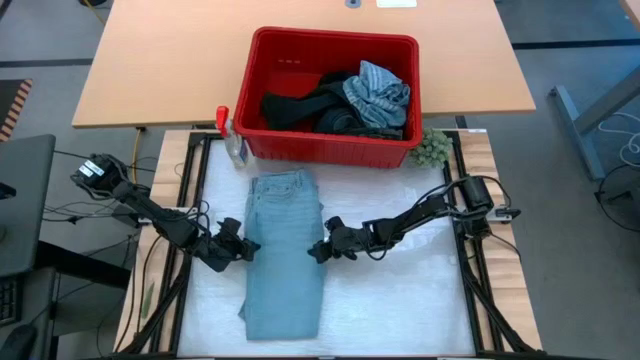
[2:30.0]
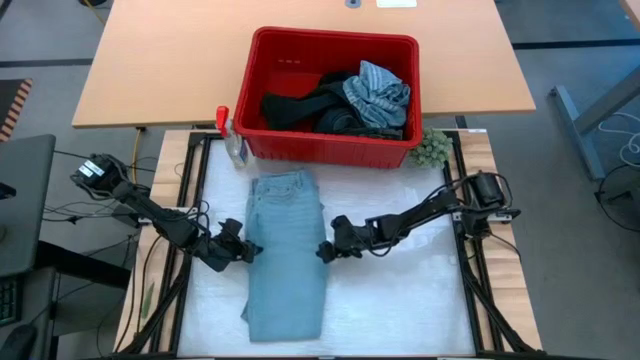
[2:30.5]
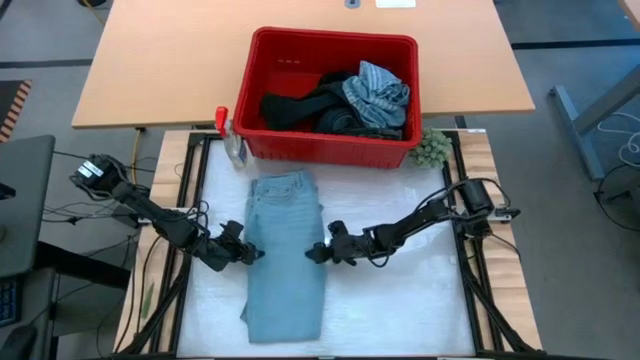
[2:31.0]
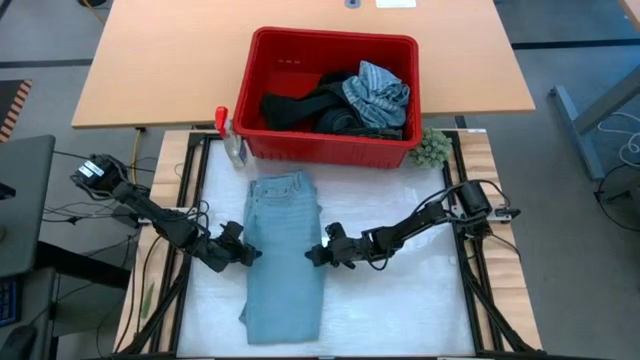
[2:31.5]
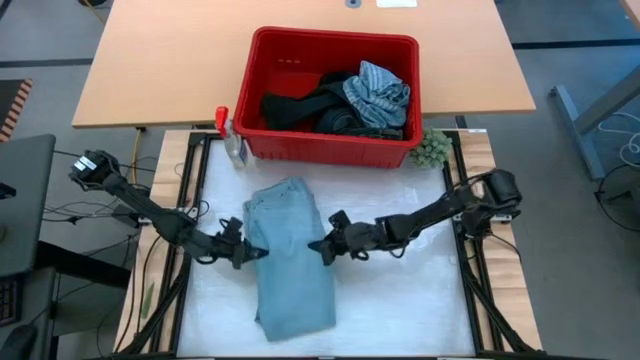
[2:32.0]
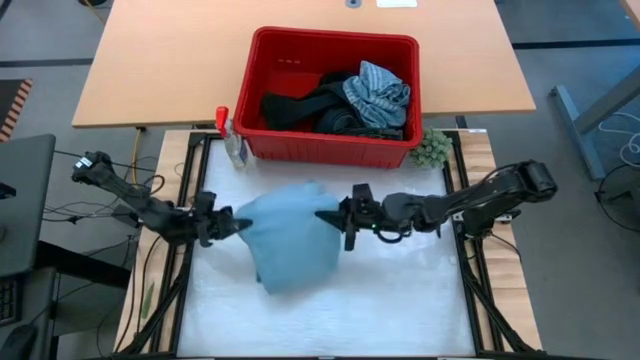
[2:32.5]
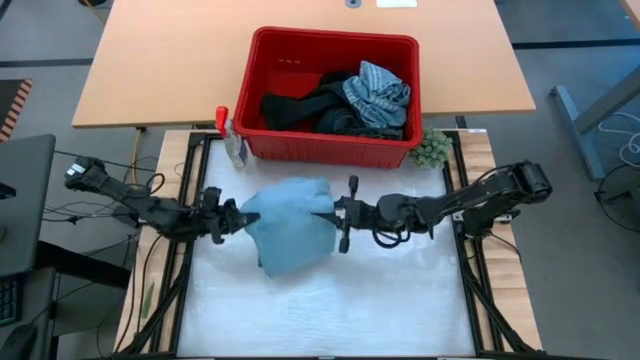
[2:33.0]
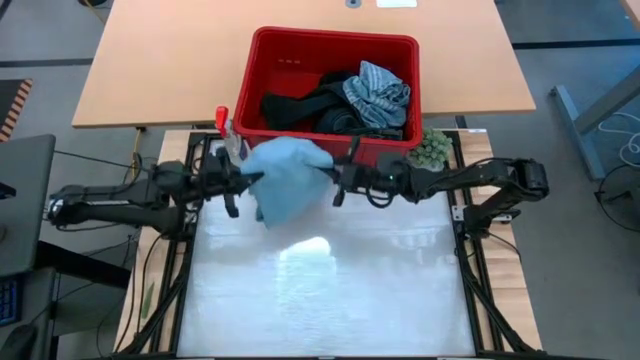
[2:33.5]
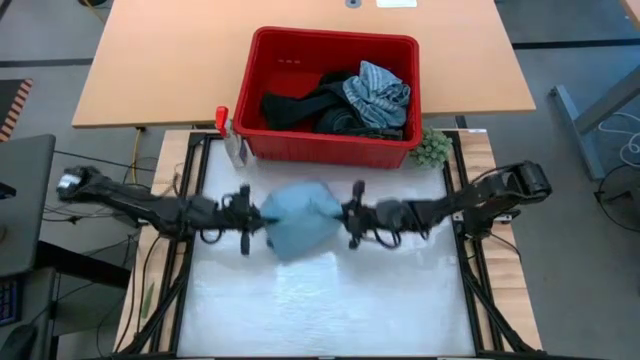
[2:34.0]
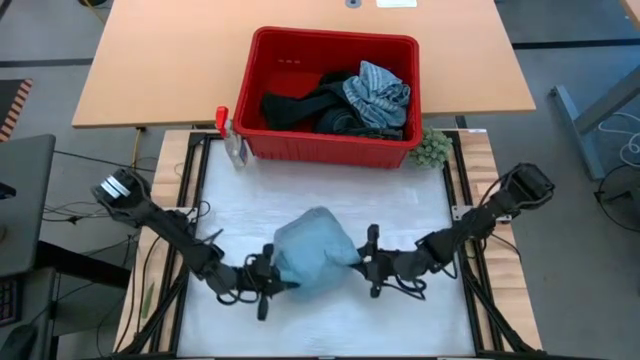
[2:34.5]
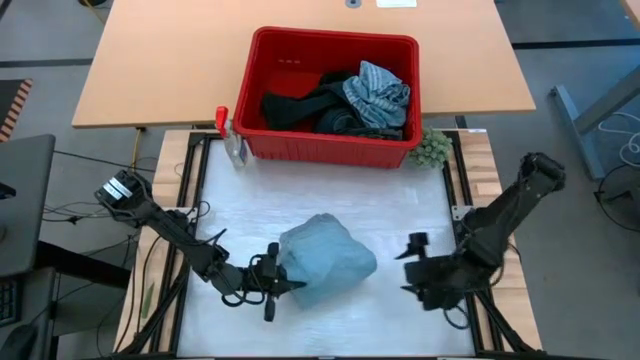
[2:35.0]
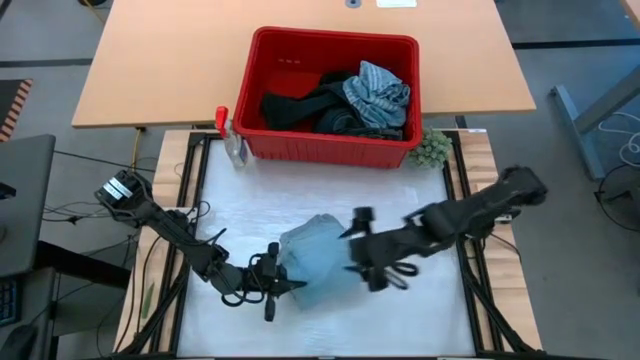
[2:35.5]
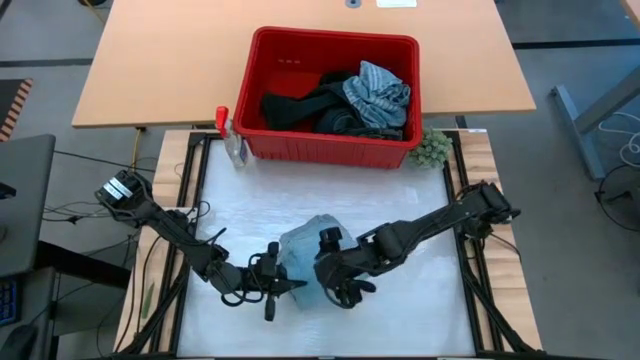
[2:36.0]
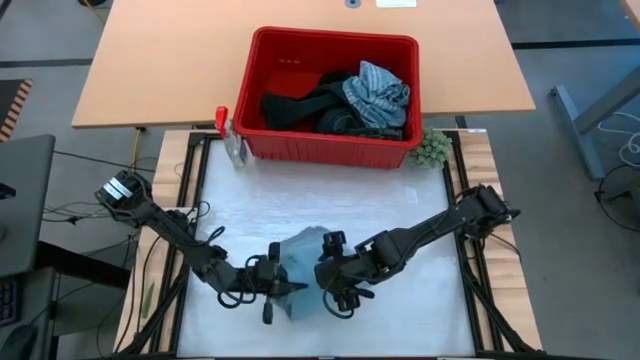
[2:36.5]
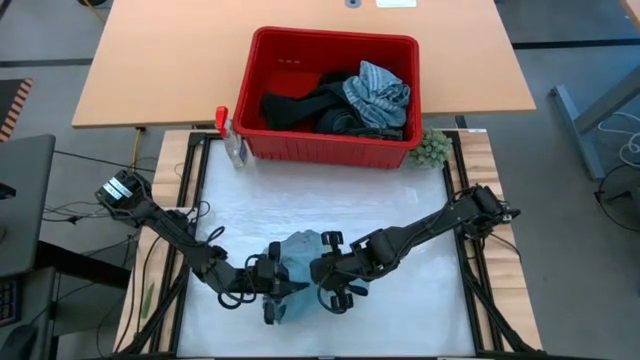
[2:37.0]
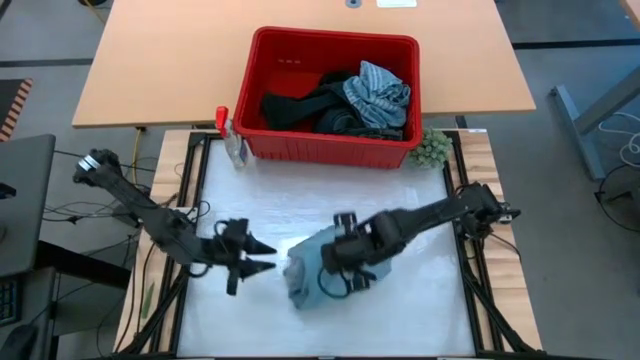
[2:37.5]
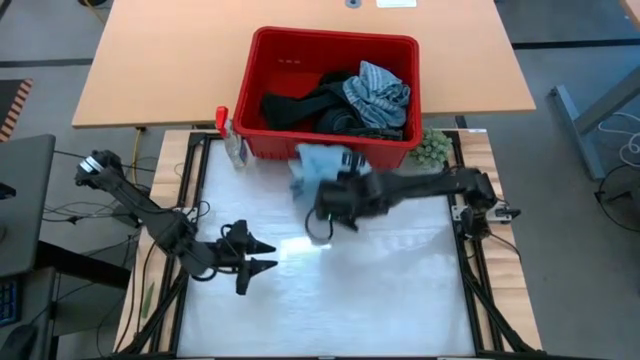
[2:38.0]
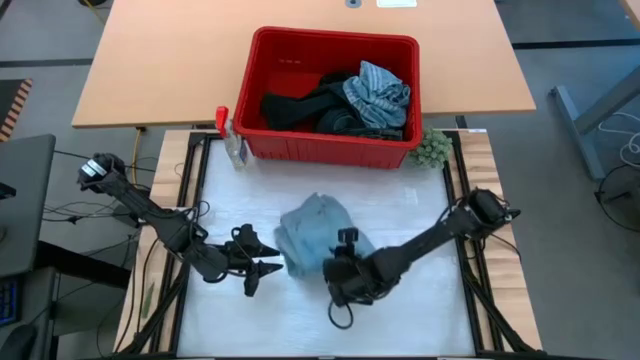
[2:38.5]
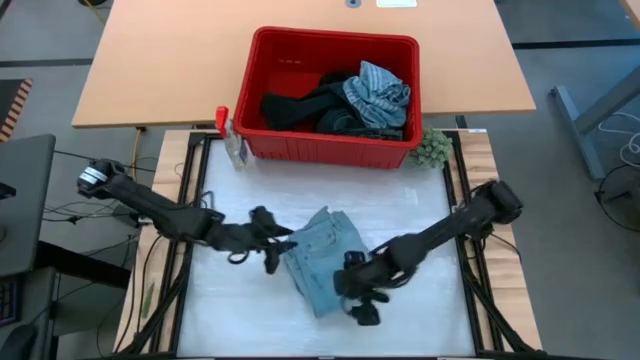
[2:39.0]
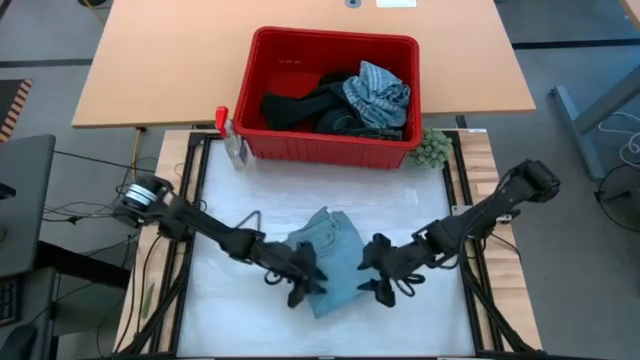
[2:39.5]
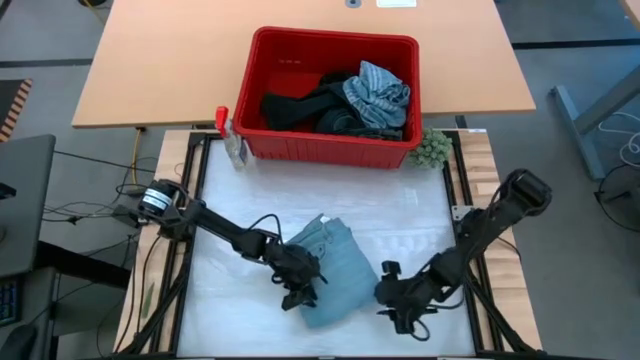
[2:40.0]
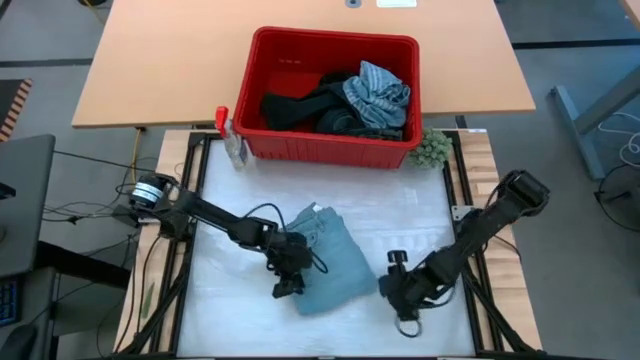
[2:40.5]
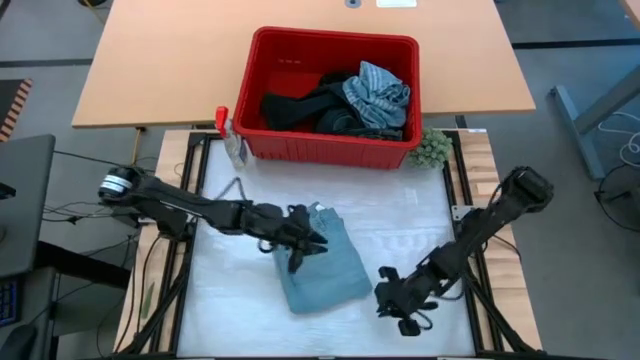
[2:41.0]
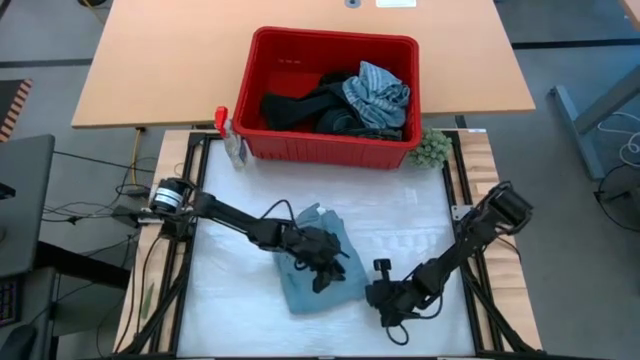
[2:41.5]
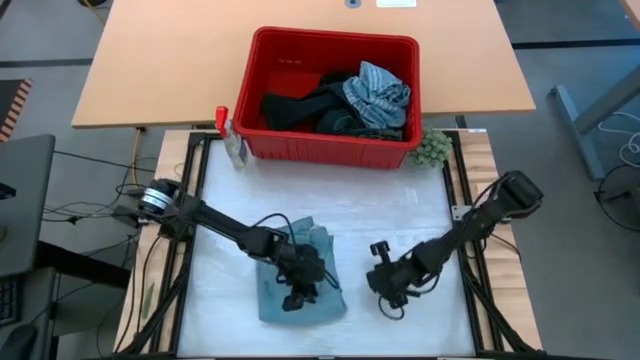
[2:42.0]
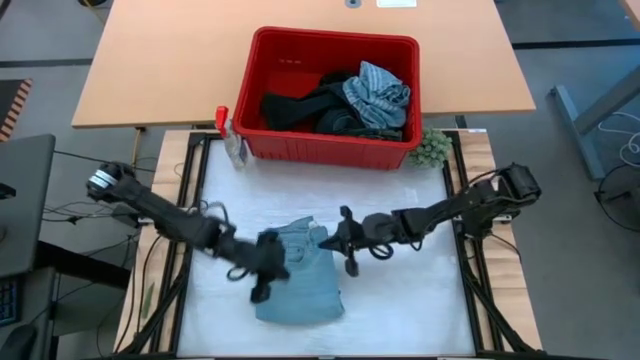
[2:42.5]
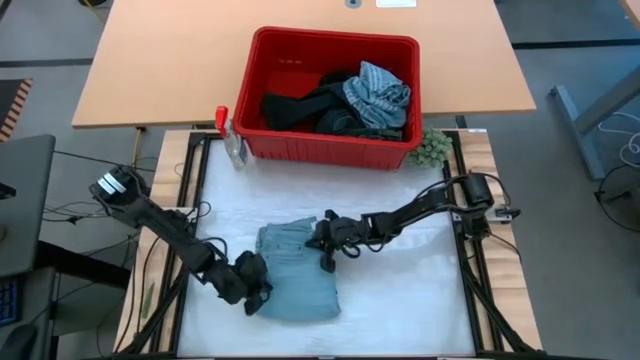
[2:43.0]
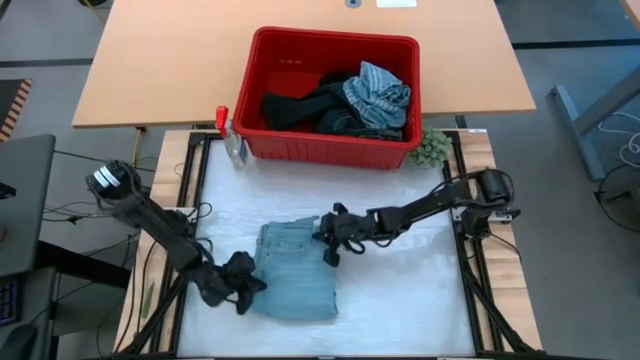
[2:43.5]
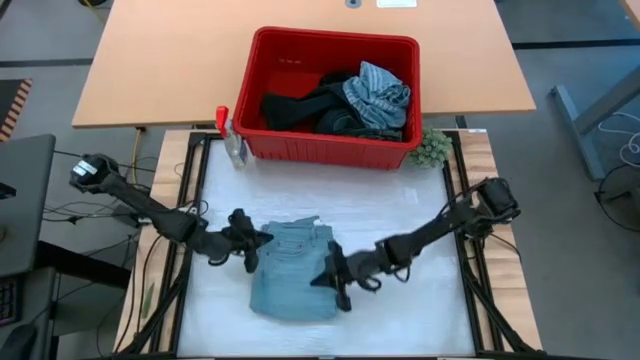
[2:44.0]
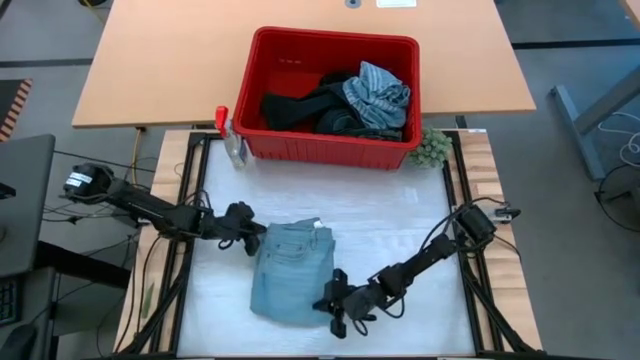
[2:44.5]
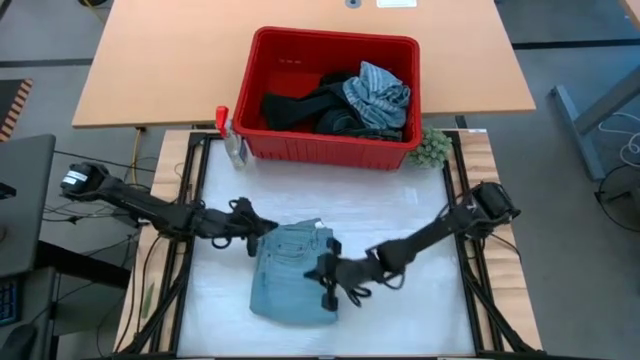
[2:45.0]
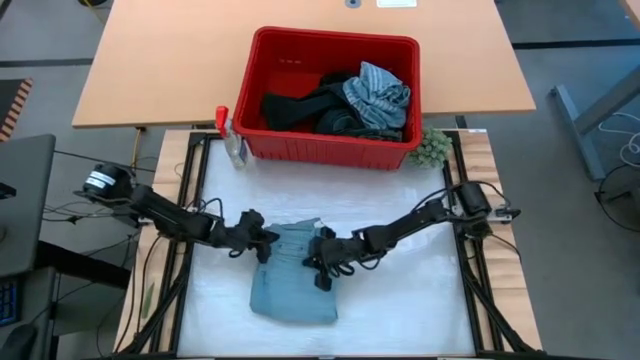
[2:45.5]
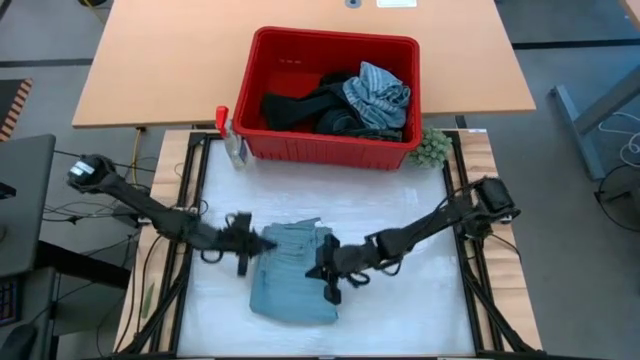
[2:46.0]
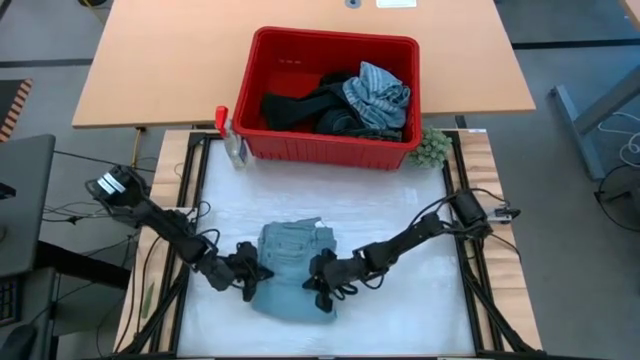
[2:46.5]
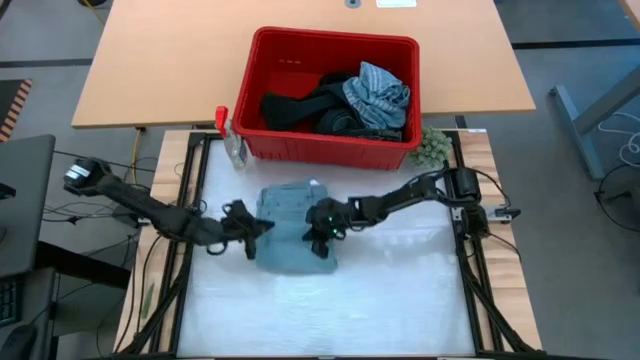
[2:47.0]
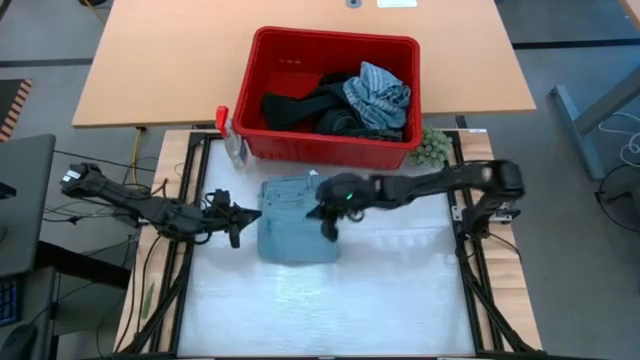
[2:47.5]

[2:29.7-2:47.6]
Task: Fold laundry
Fold the blue pants from the red laundry bin

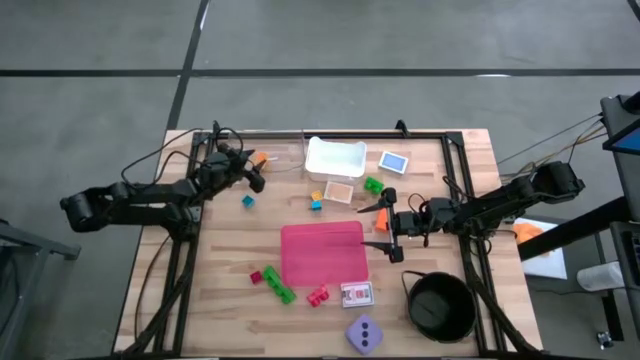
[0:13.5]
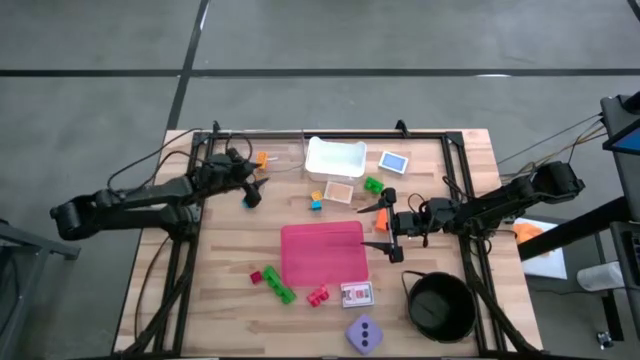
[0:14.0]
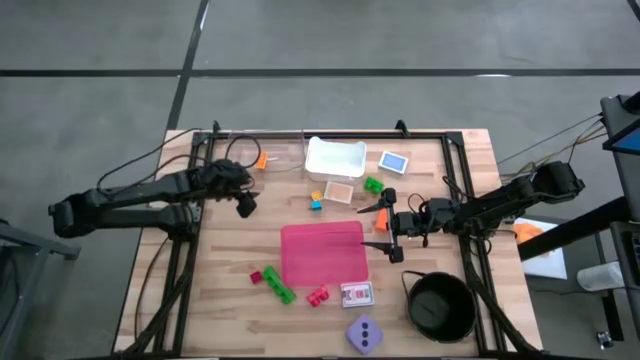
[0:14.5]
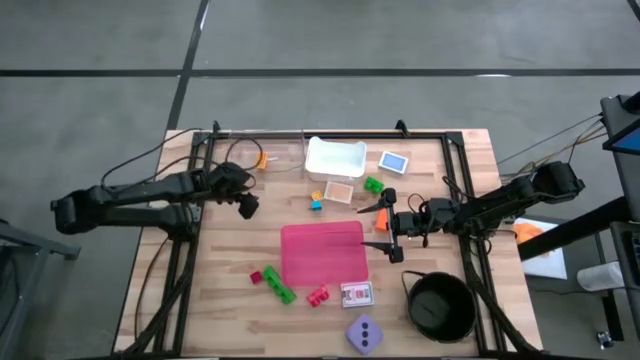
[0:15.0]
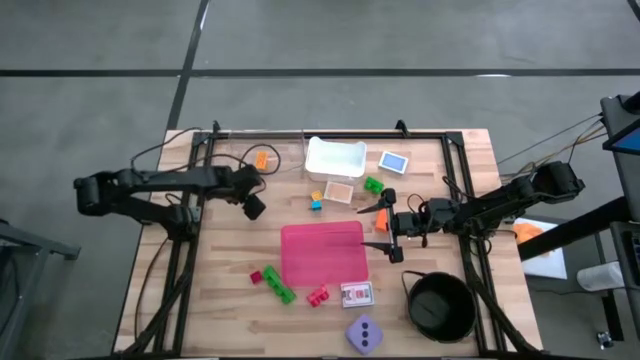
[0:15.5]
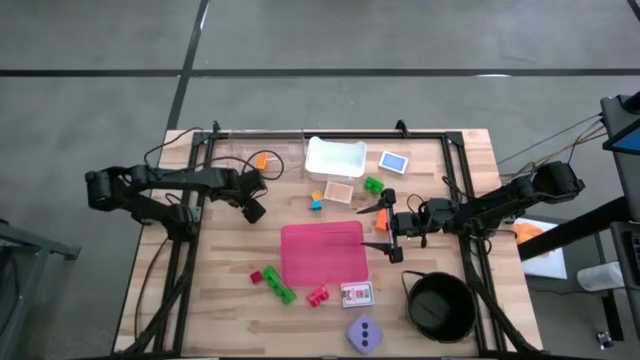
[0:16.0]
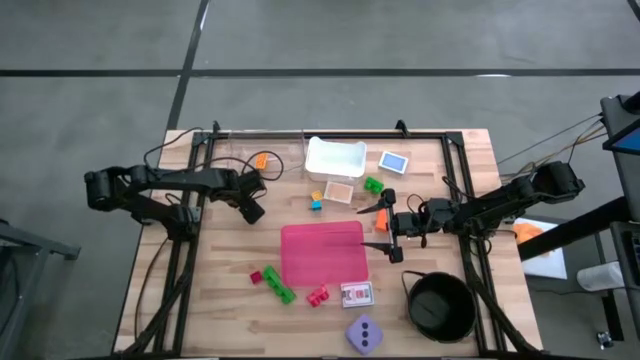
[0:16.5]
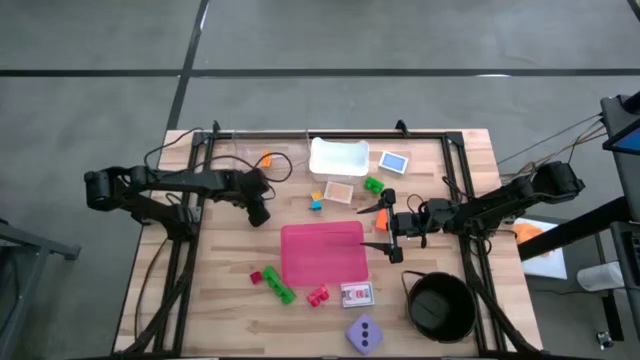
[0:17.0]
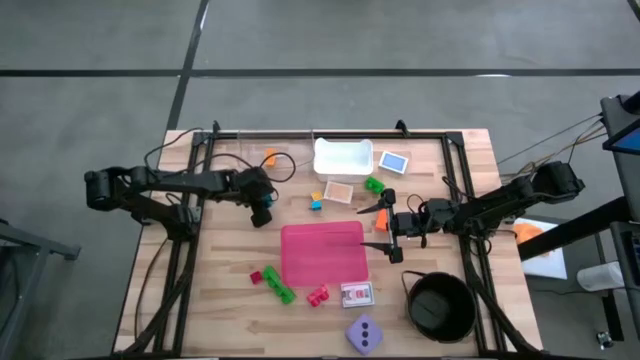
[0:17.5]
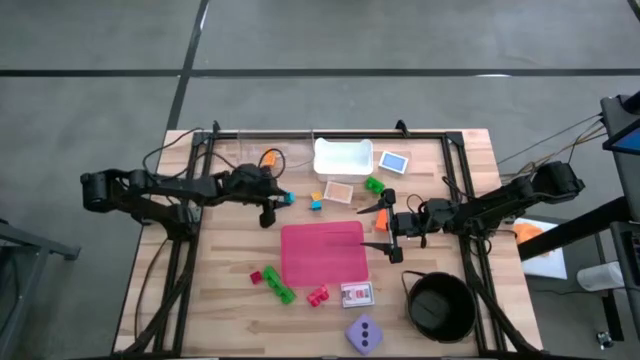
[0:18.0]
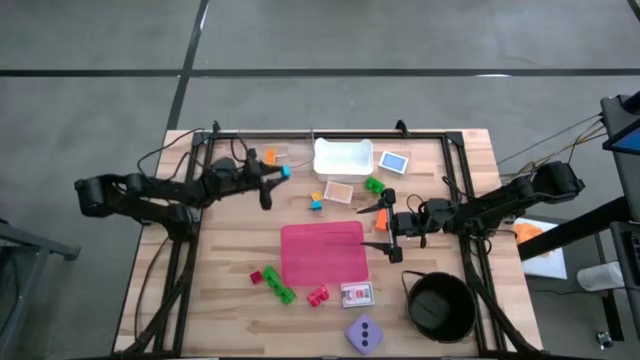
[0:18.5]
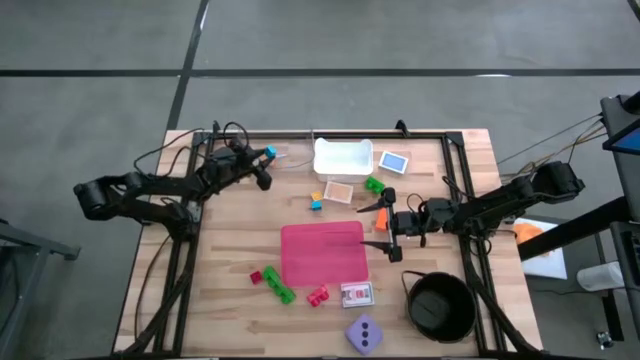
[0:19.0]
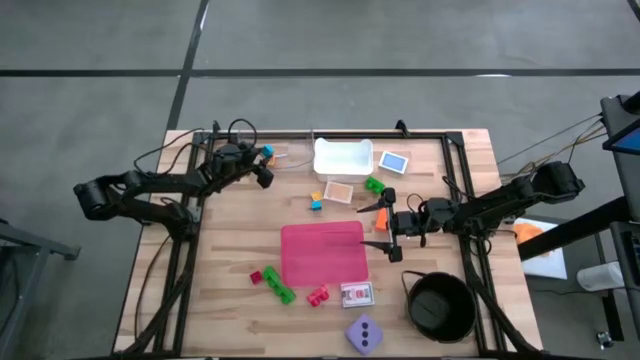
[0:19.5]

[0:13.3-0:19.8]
Task: Pick & Place Toys
Put the left blue game piece into the transparent bin
